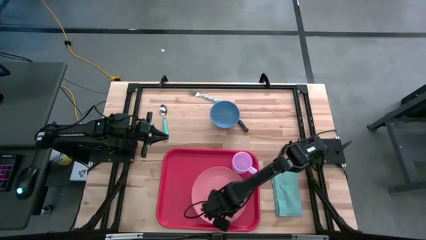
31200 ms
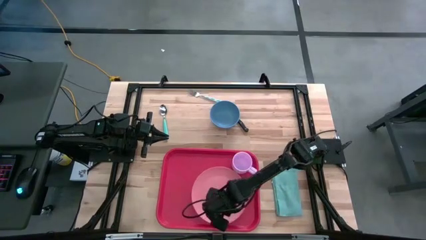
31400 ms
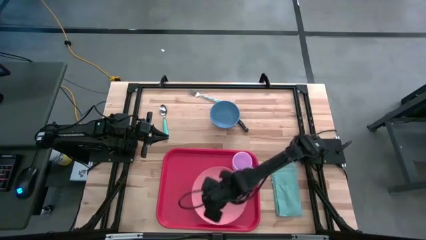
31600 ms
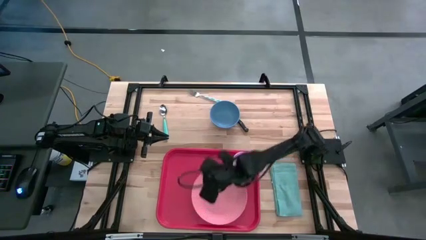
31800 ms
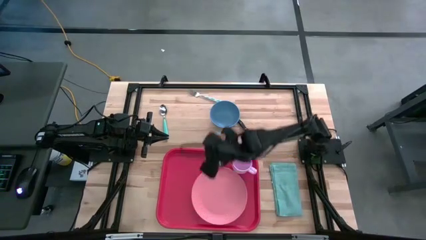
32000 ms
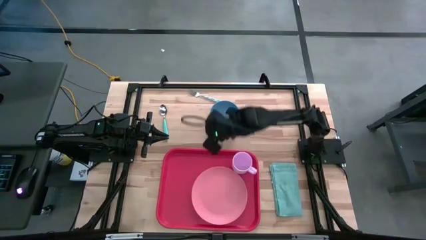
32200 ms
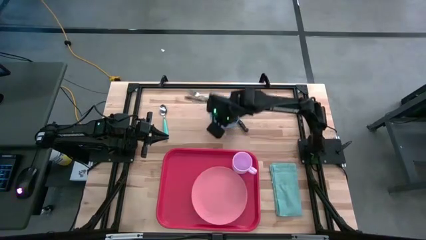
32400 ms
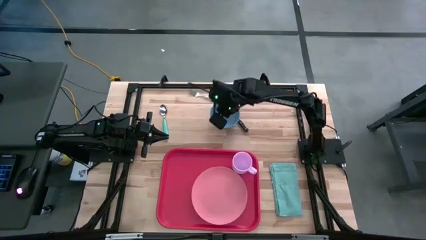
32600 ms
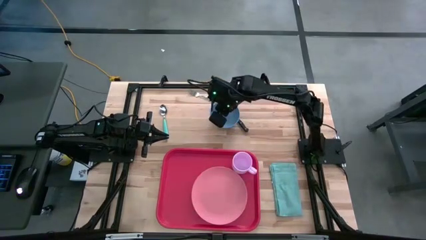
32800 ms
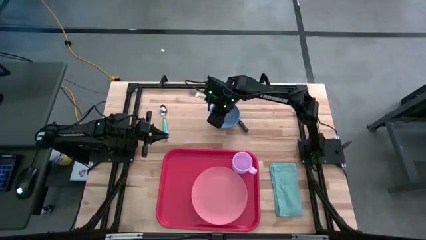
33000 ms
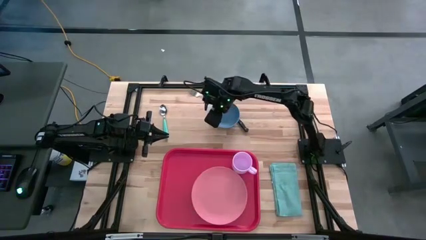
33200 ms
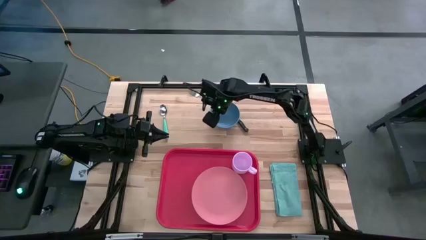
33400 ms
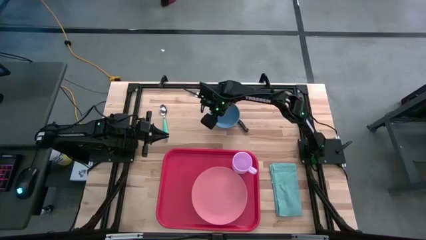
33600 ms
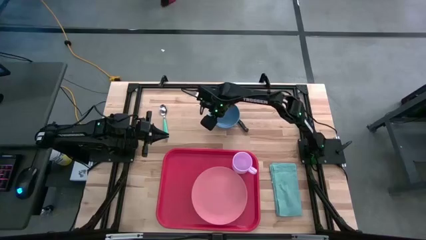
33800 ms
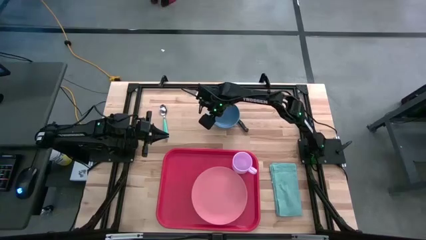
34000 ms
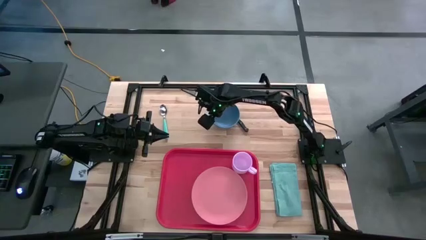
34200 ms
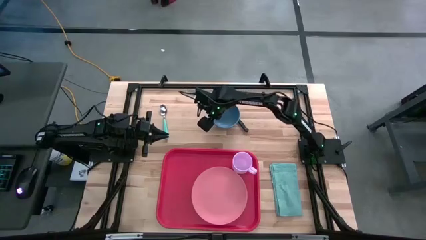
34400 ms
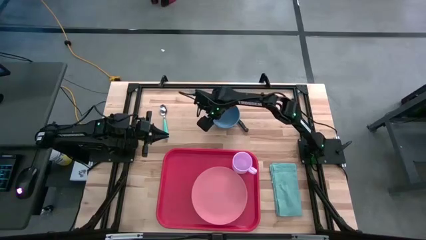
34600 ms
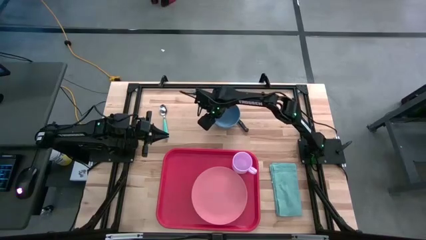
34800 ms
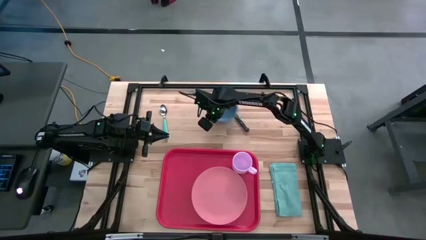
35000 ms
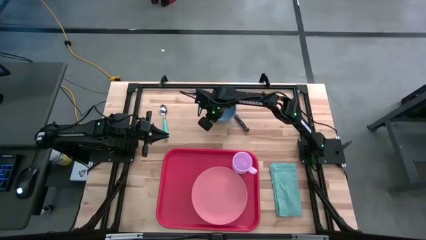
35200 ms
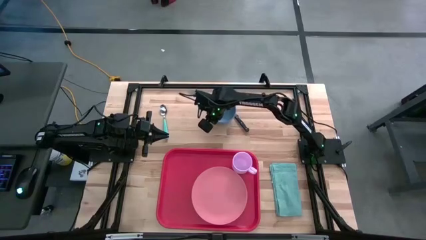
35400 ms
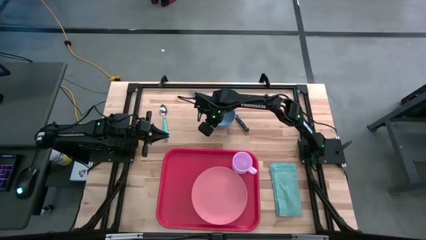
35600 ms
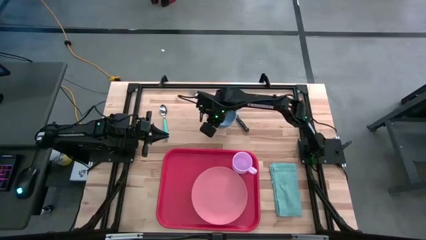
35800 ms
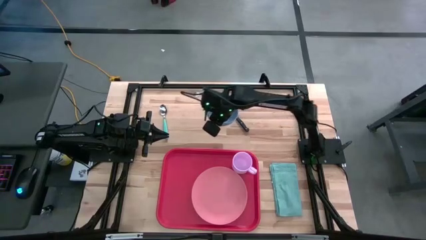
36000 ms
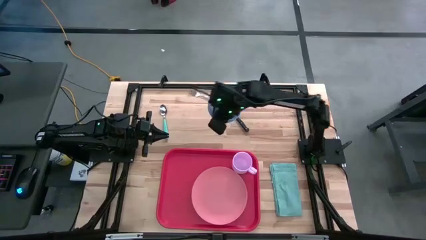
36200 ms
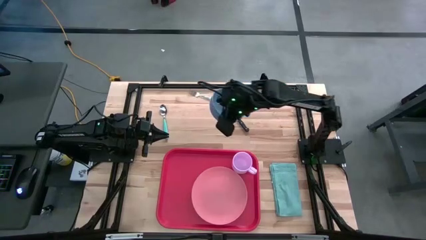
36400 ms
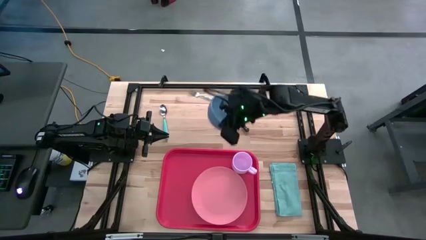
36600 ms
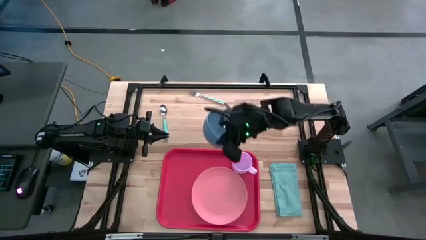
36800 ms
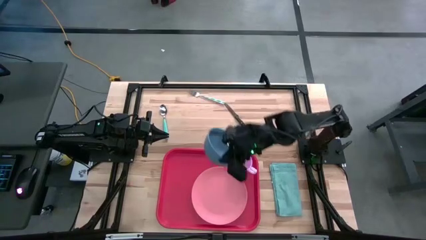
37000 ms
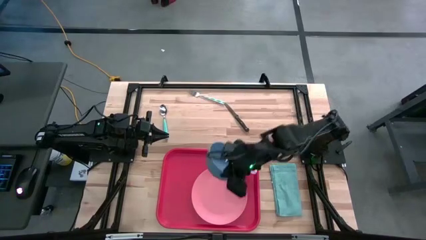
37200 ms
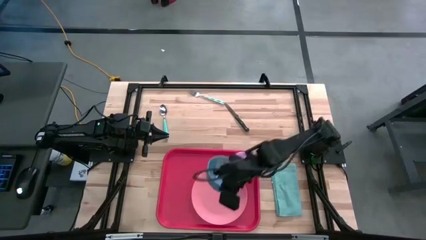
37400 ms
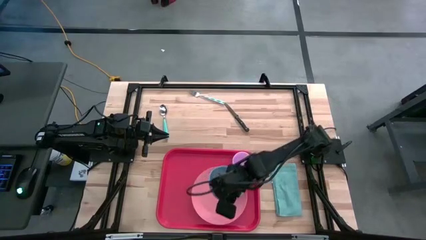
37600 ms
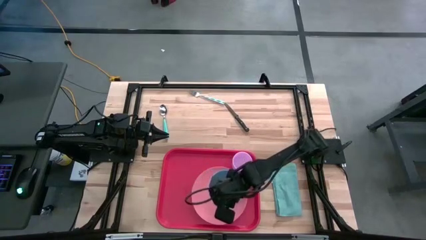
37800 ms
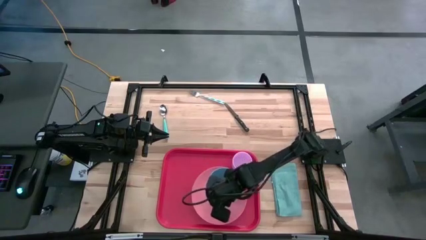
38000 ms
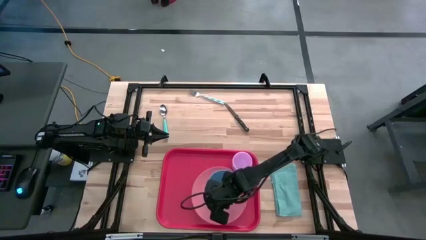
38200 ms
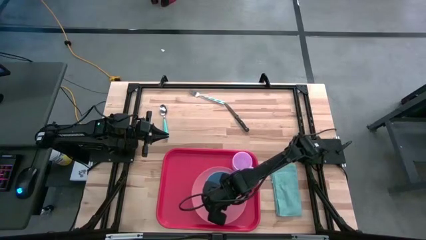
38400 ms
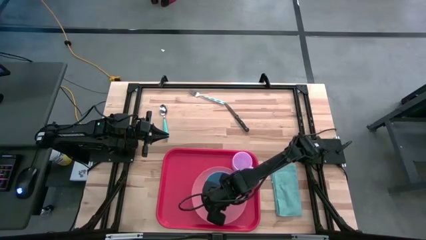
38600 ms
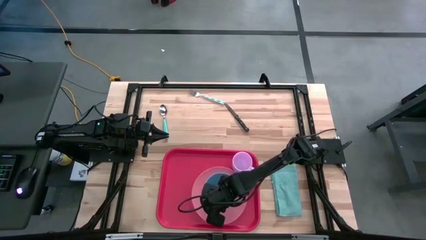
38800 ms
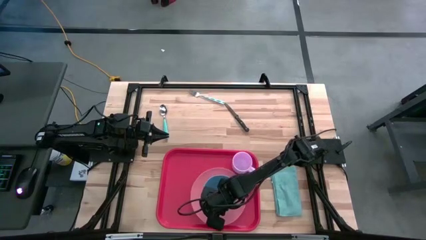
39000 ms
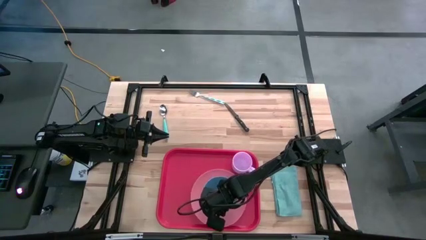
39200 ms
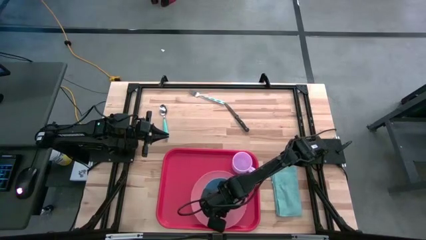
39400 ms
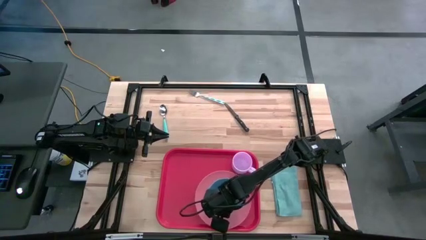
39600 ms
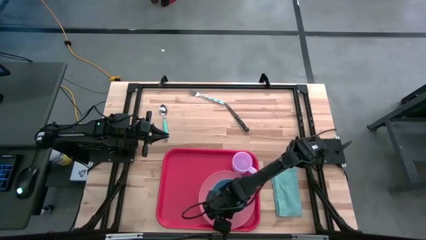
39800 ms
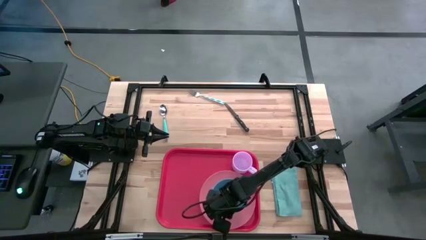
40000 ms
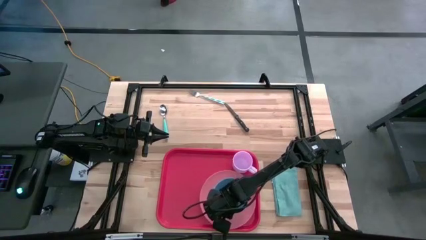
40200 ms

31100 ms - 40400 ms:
Task: Set up tray
Put the blue bowl on top of the pink plate

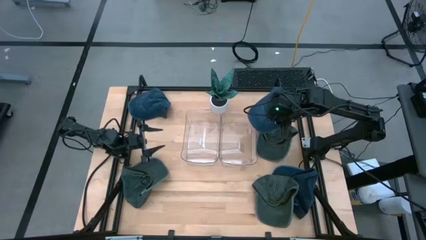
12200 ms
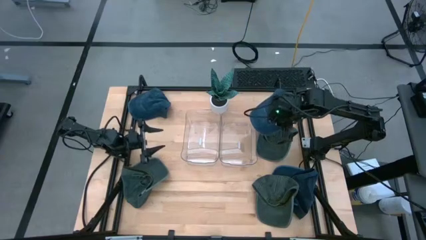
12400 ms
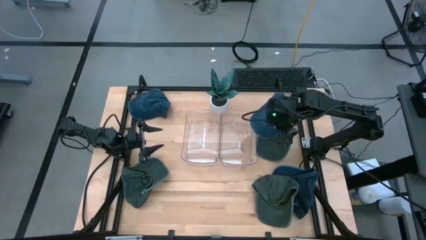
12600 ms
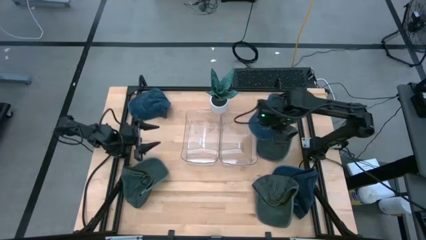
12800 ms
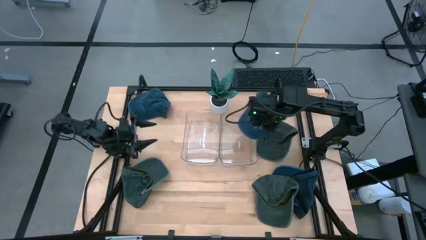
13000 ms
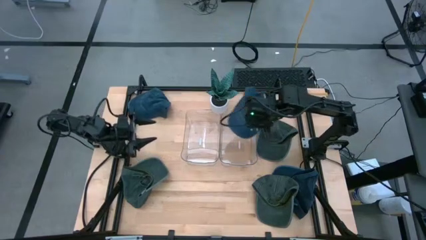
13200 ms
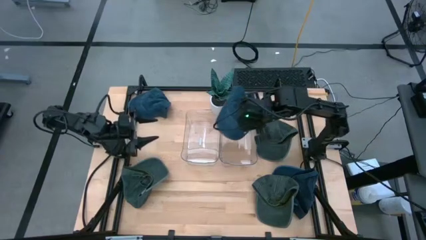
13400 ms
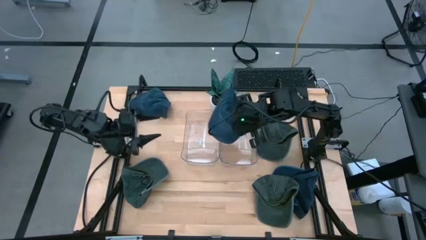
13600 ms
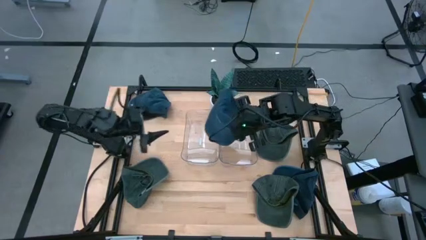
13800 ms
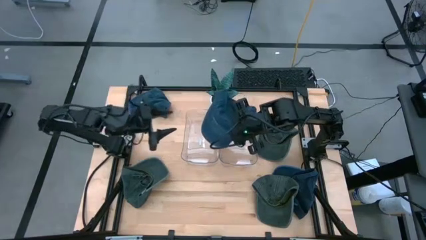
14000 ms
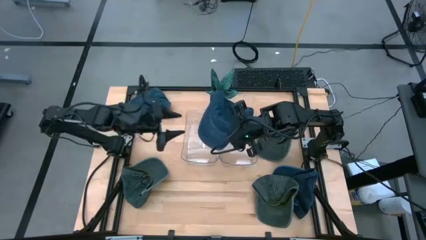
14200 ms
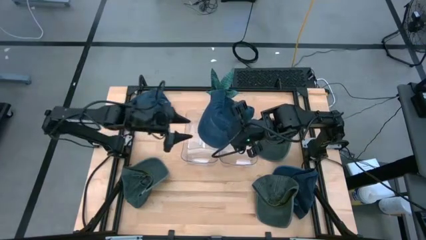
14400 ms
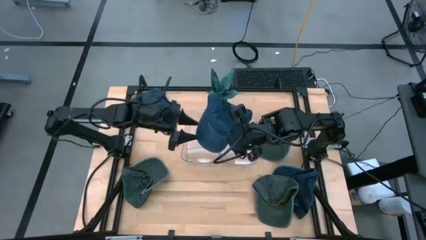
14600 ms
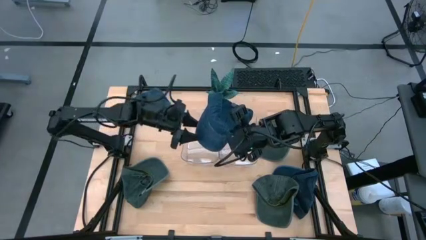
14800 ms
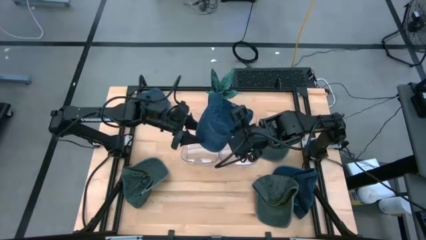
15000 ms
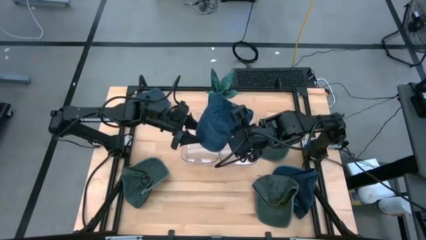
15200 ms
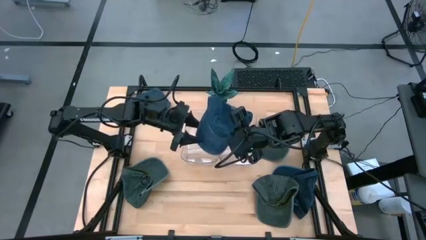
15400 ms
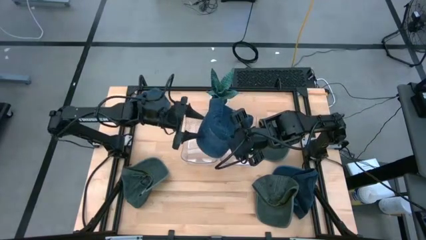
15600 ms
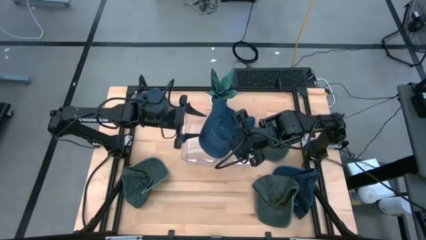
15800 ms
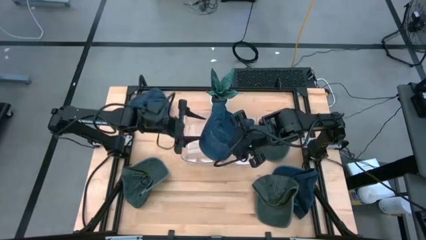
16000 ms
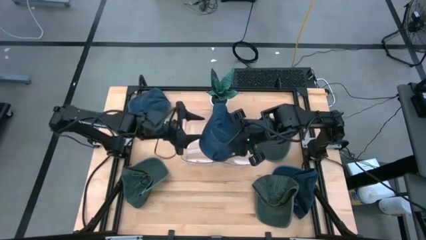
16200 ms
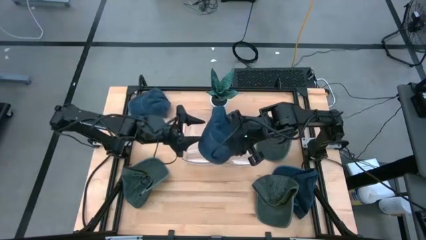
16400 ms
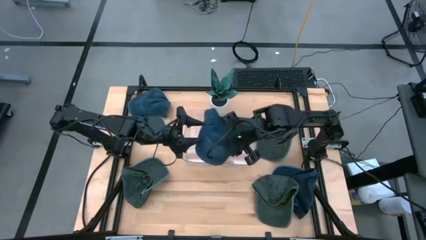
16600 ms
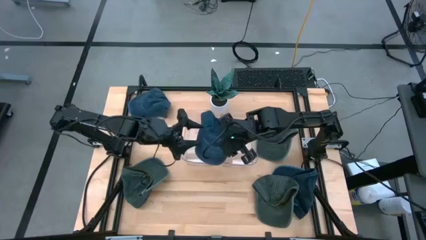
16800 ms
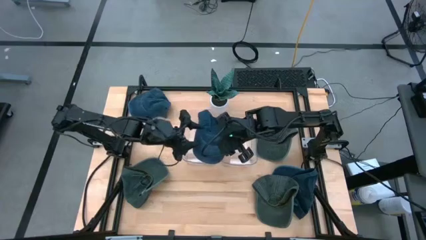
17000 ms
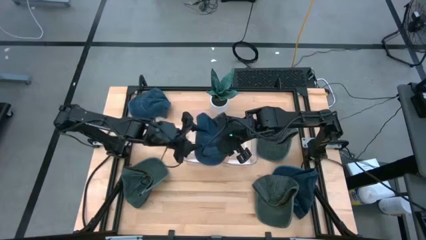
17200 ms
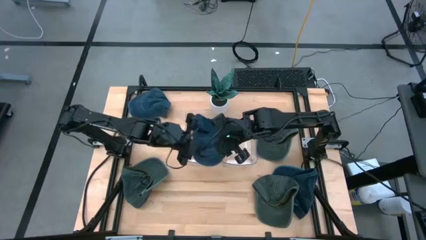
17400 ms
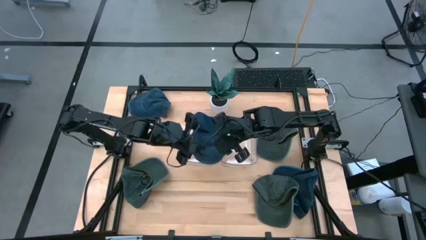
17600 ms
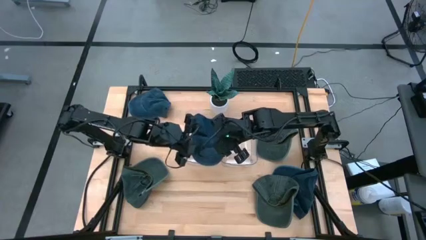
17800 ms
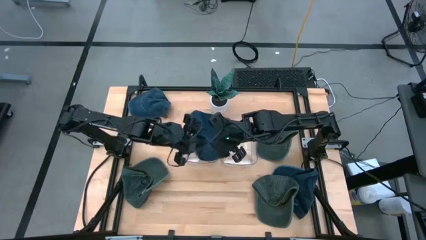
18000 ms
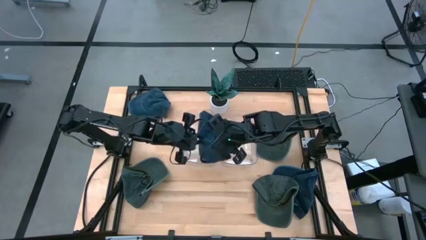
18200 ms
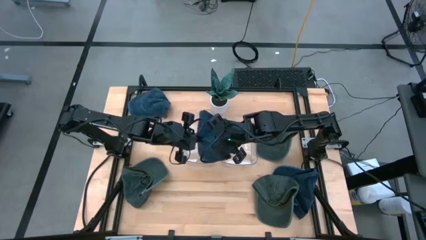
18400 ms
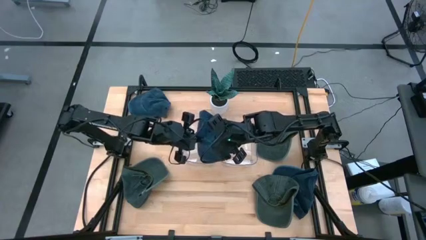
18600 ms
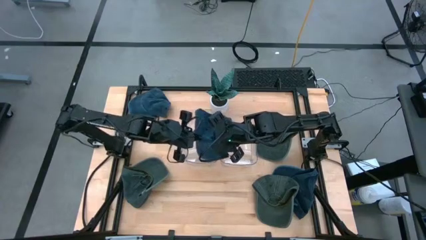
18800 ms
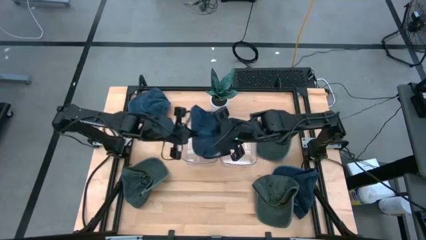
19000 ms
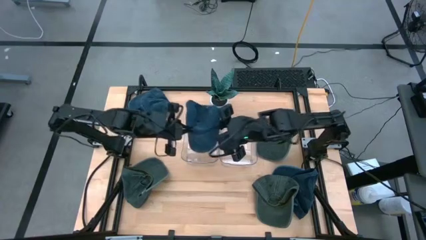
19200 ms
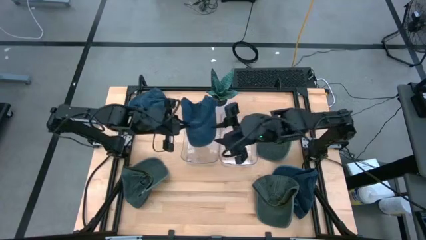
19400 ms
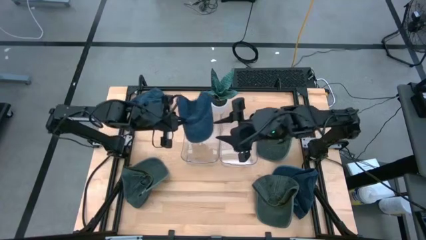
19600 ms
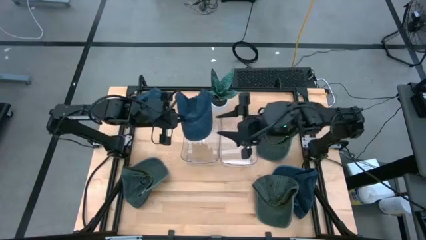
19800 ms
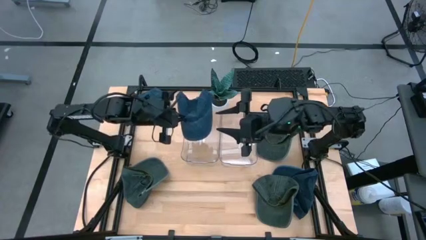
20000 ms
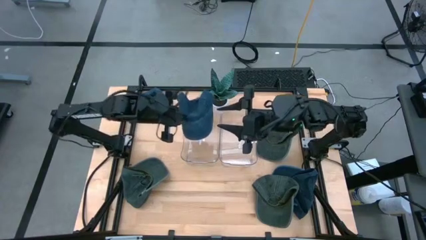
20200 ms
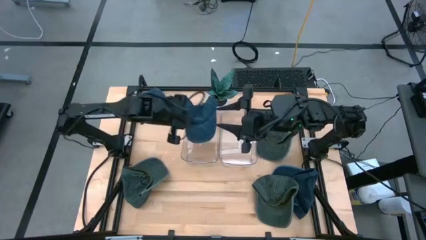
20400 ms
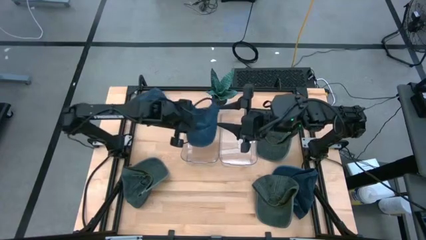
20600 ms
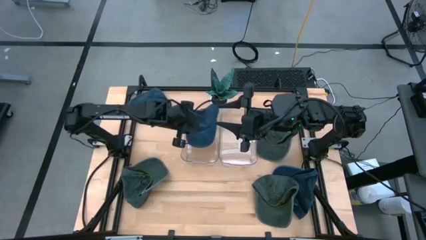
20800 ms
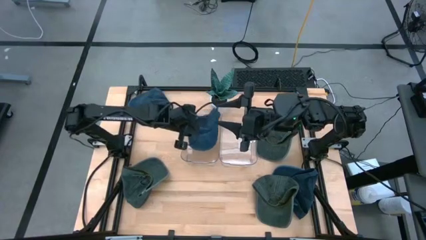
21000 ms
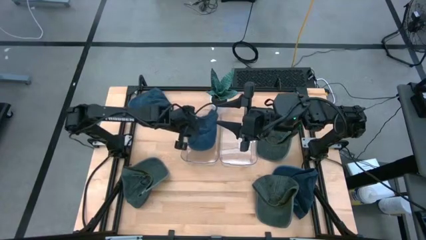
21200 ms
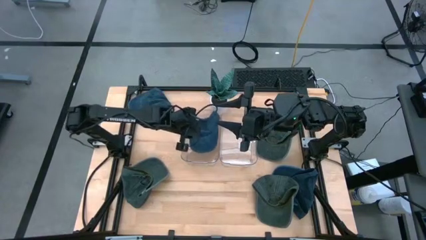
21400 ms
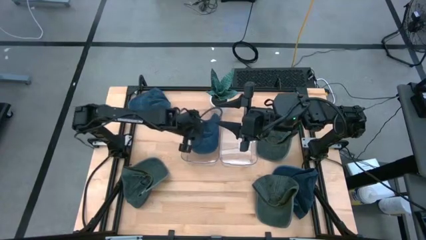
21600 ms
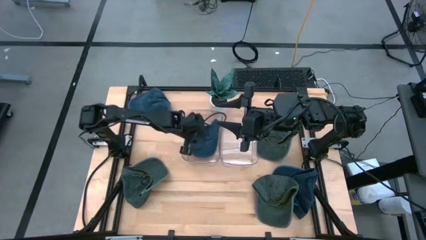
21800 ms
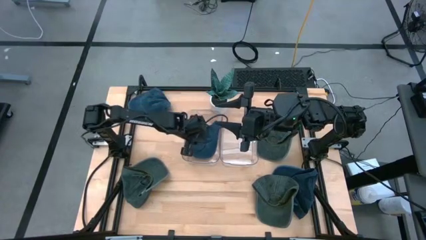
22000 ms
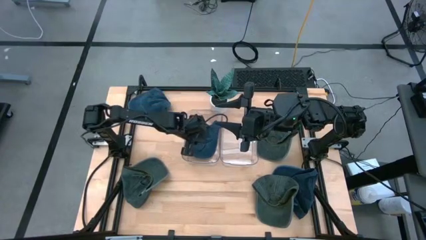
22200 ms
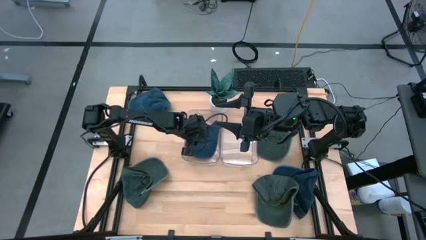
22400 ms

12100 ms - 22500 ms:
Task: Pick & Place hat
Put the top right blue cap into the left transparent bin
